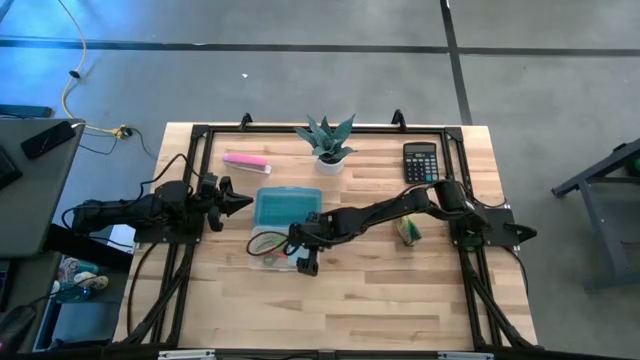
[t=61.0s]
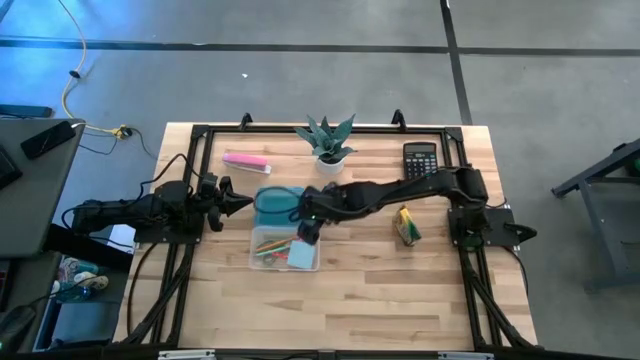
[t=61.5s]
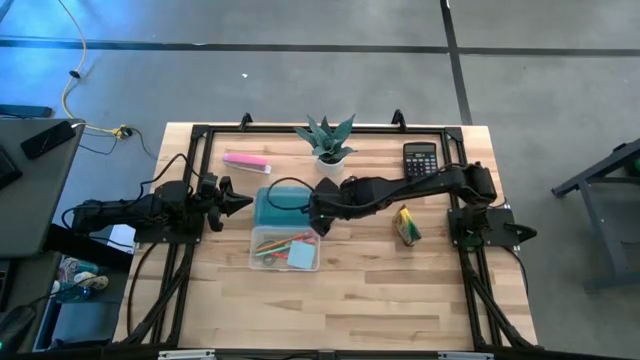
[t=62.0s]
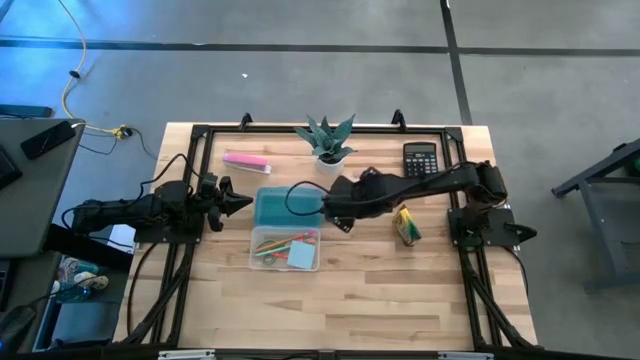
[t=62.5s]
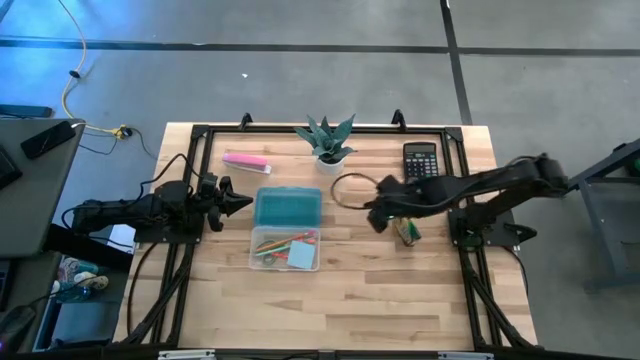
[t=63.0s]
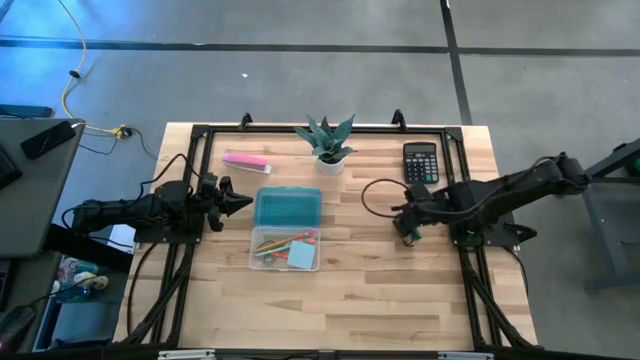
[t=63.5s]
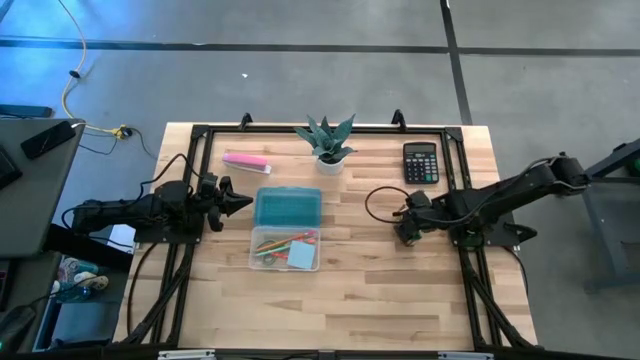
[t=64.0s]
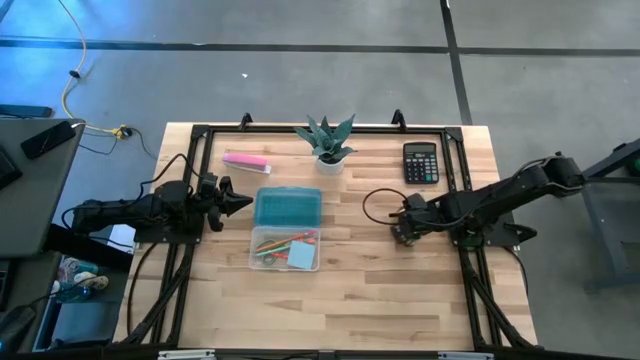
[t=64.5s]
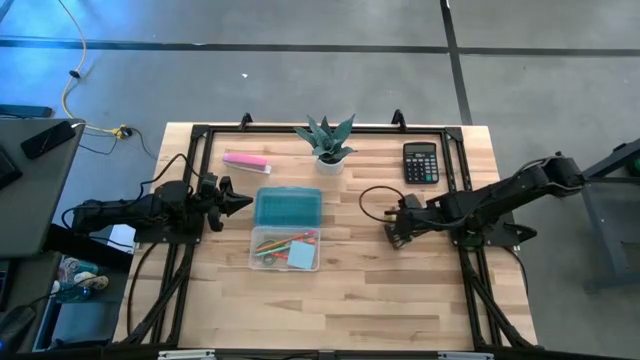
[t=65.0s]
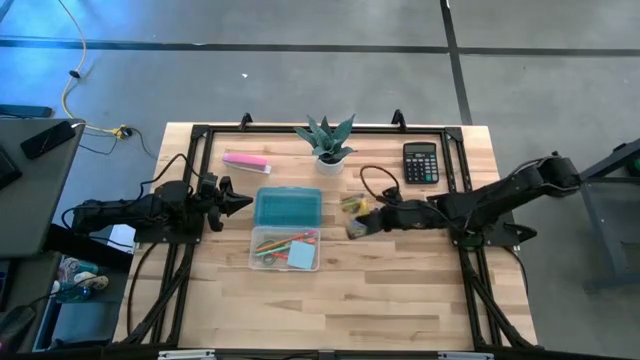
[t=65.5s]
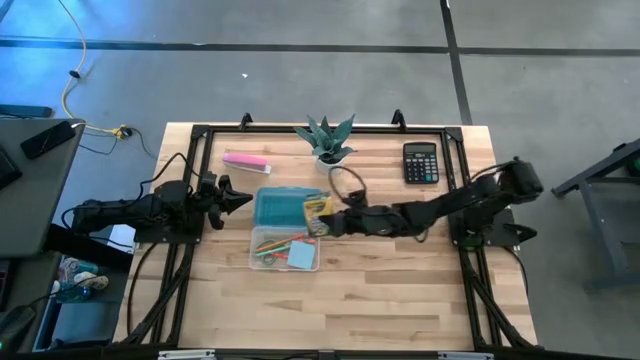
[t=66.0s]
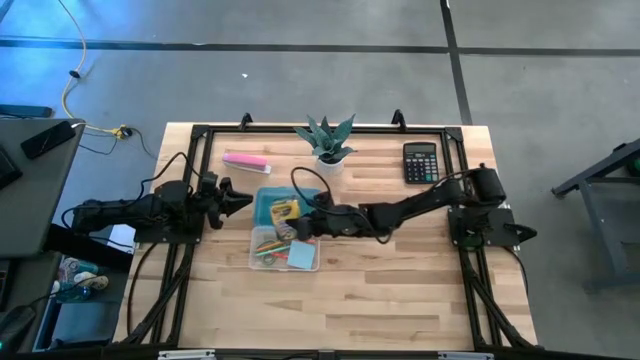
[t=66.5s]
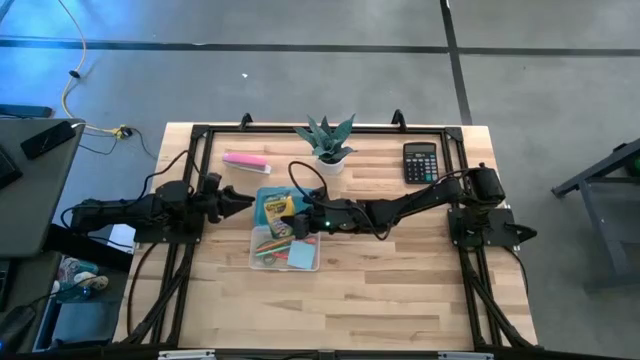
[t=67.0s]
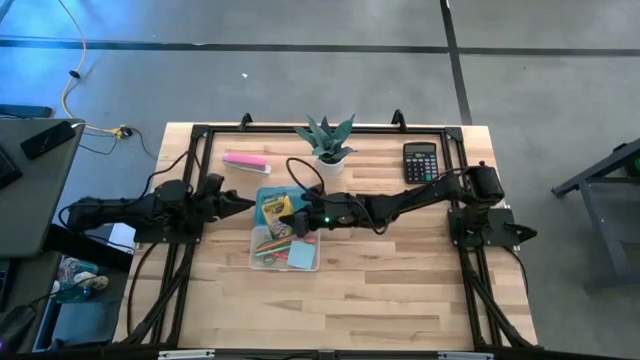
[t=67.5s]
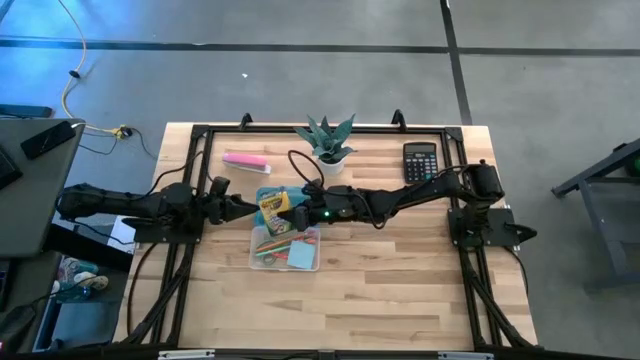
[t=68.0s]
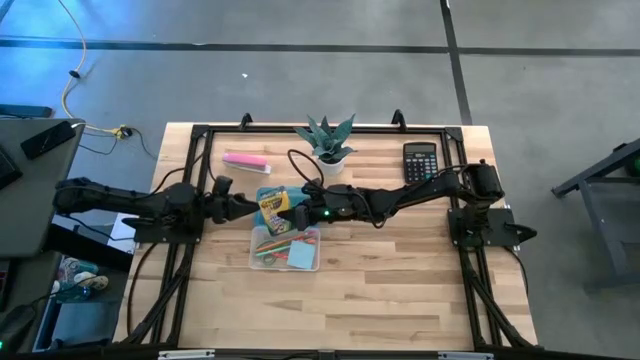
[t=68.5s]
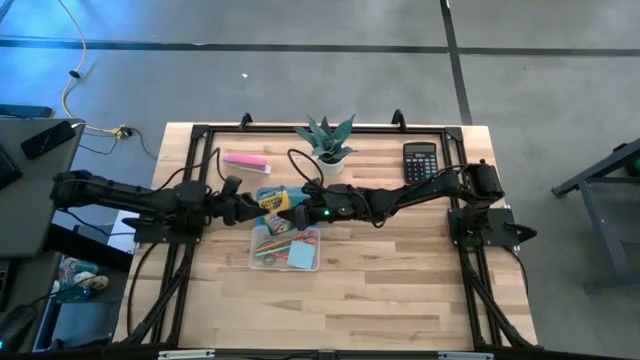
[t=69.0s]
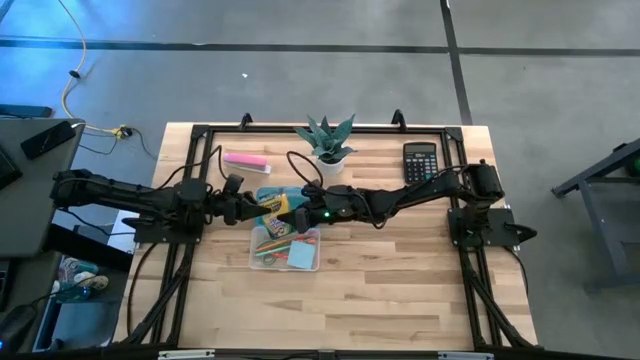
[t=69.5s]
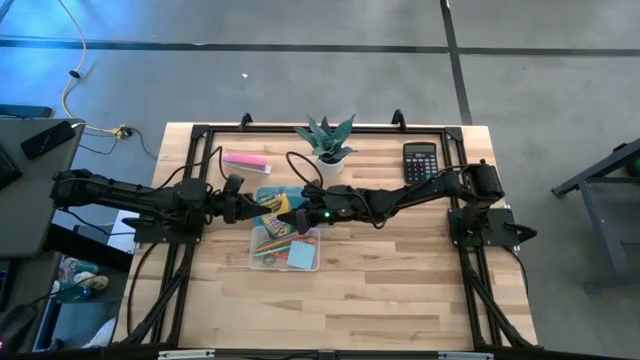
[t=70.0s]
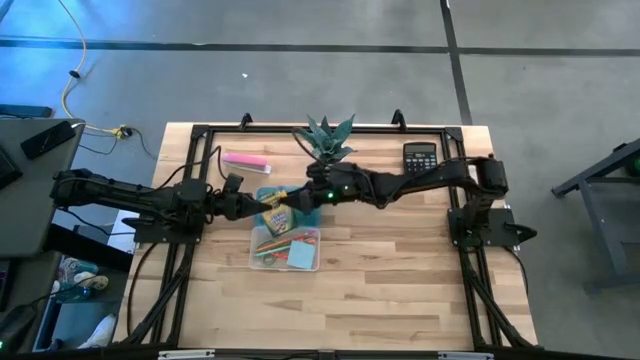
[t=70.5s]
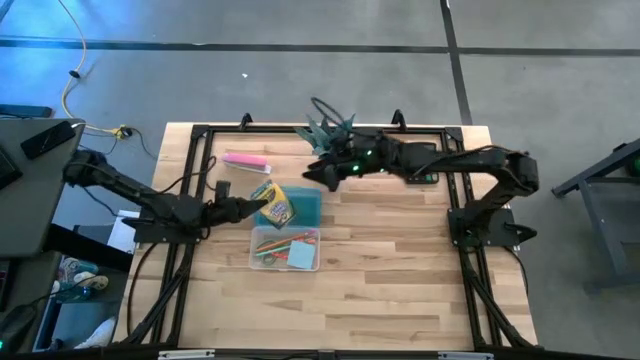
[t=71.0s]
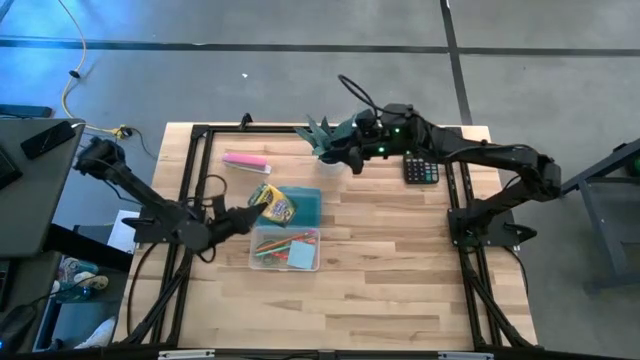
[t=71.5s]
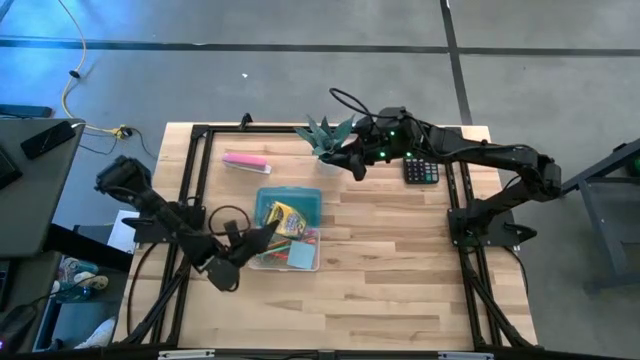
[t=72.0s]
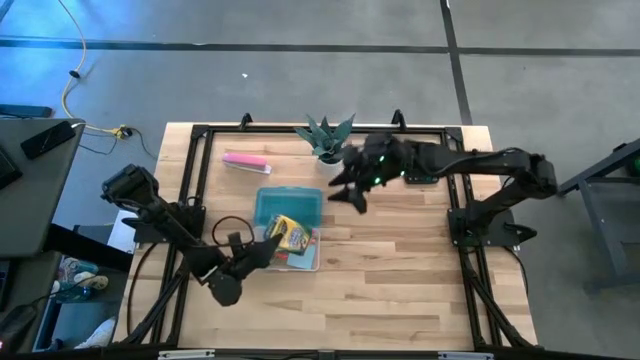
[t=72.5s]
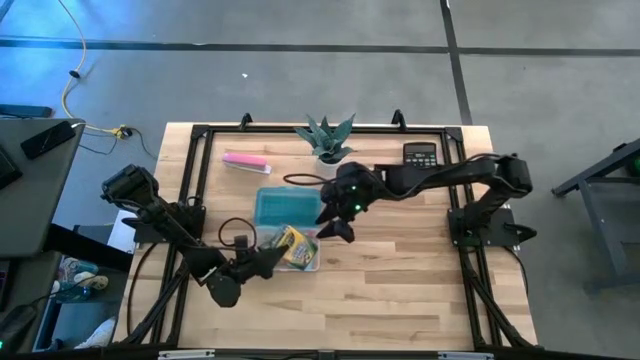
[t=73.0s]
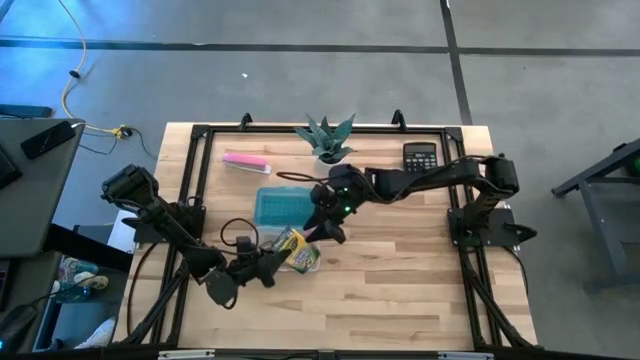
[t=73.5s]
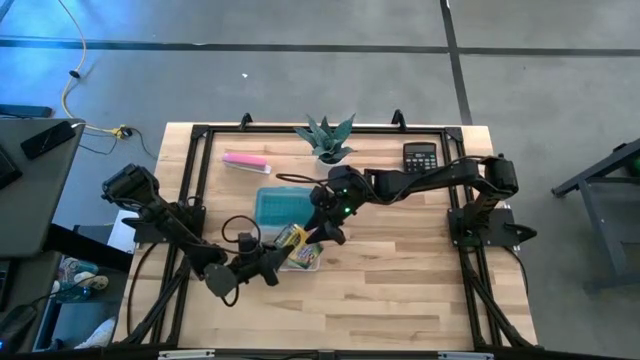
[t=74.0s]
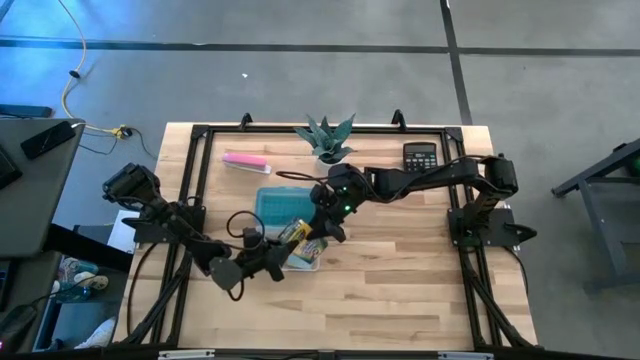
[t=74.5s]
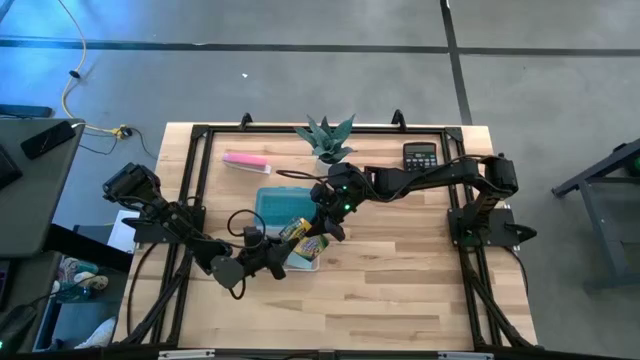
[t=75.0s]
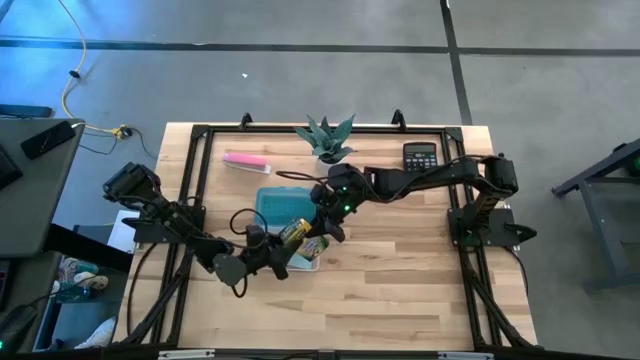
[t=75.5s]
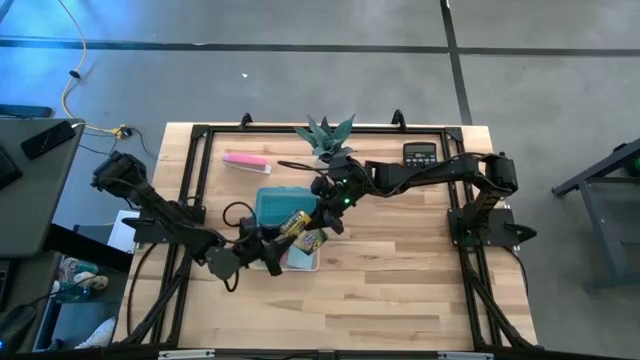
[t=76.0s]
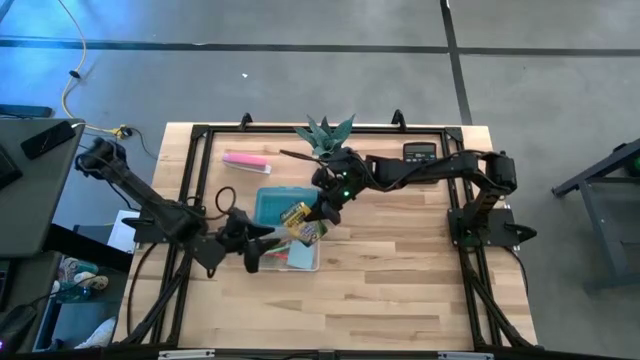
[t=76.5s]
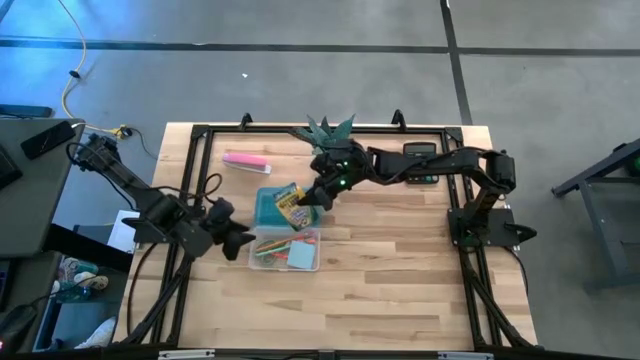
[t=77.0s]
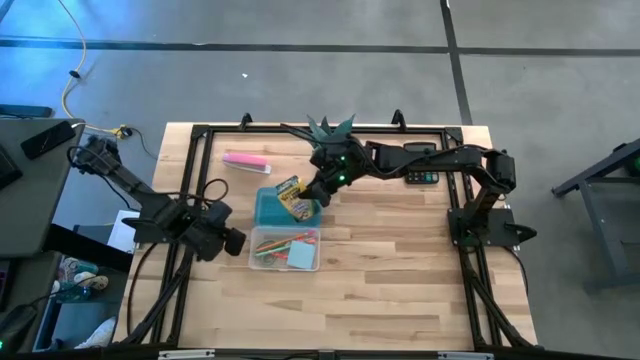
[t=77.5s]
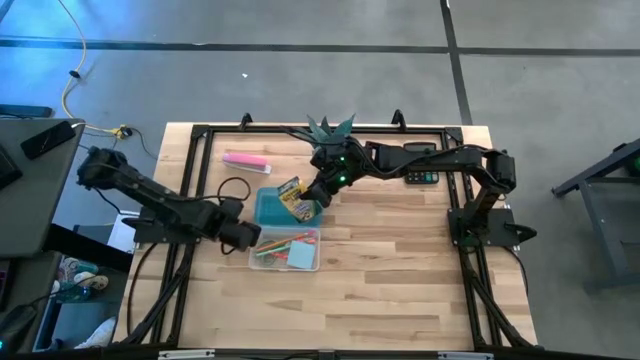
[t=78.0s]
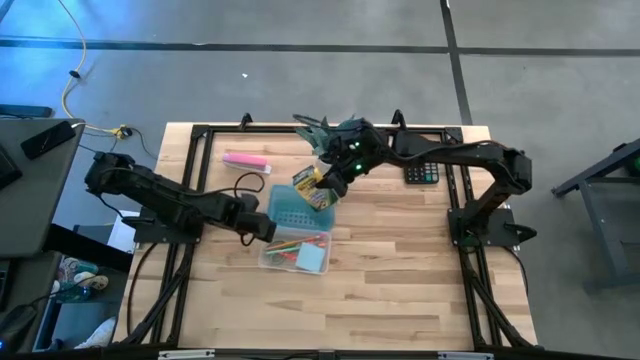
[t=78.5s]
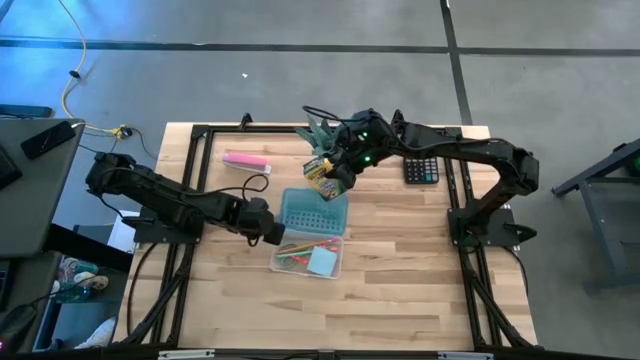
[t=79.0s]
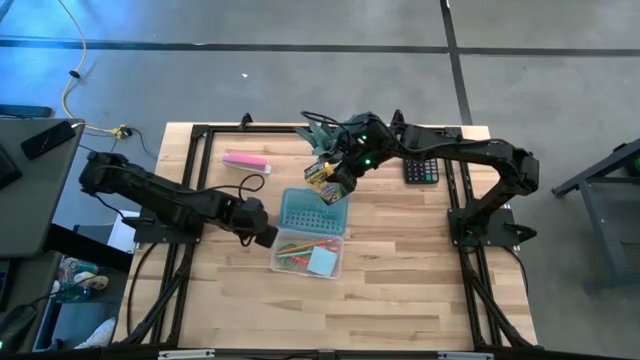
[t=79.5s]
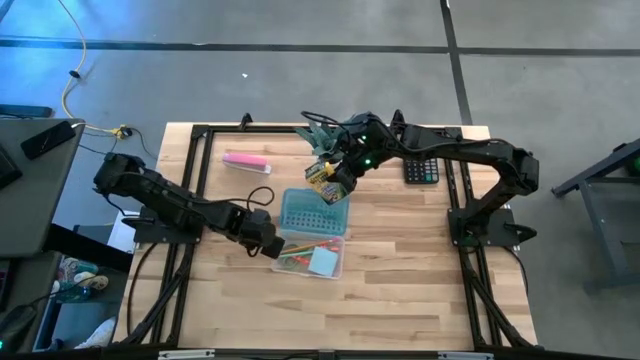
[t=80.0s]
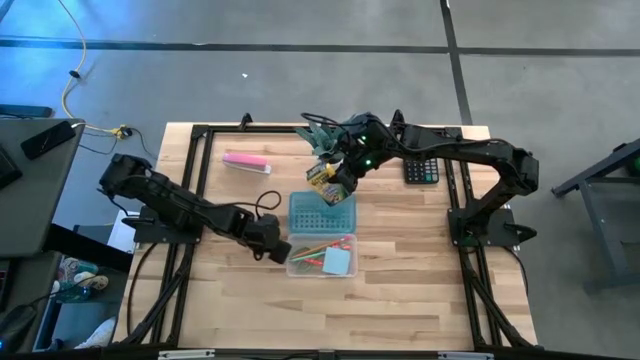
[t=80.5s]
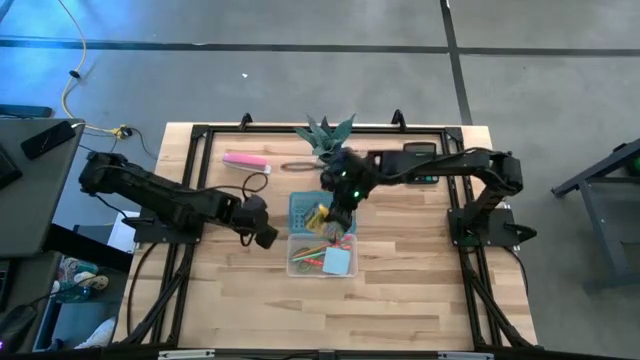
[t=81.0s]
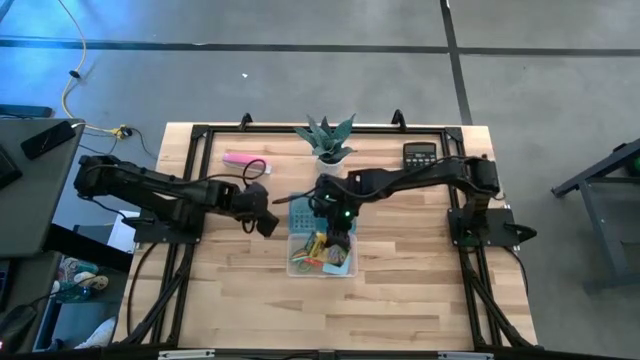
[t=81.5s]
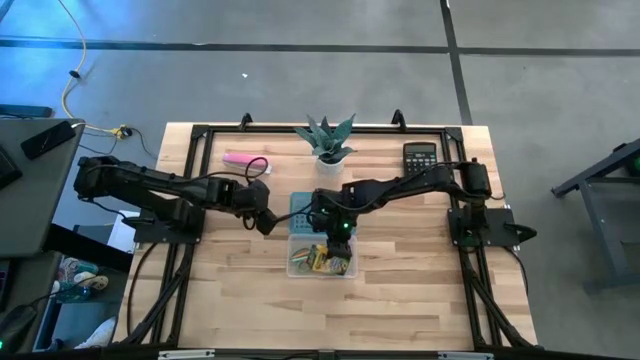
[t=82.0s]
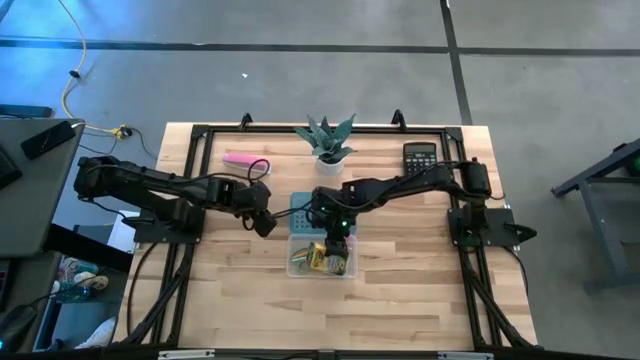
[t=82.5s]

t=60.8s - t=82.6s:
Task: Pack school essentials
Put the yellow crayon box into the blue supply box
